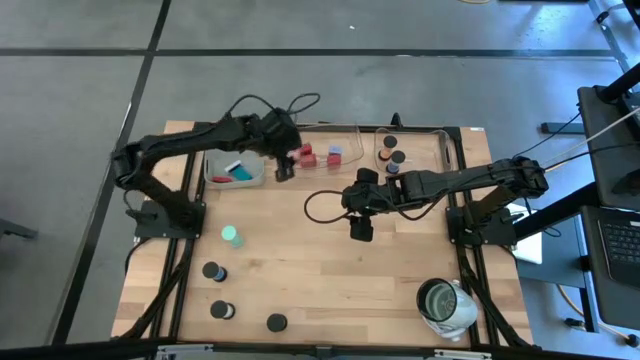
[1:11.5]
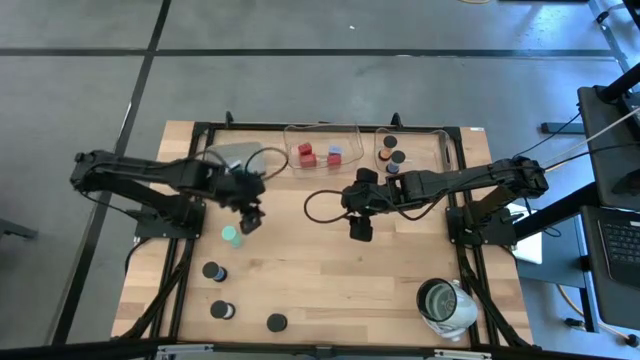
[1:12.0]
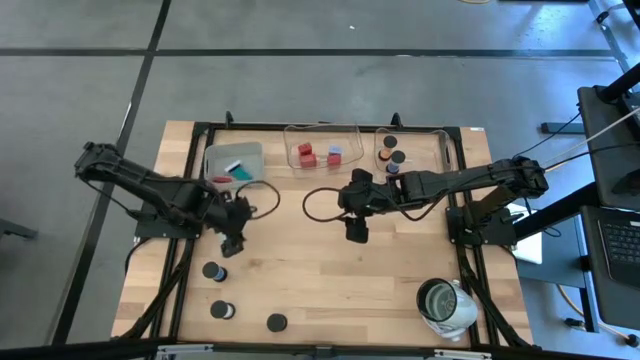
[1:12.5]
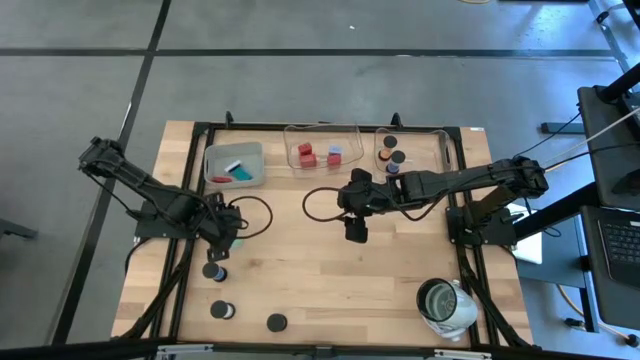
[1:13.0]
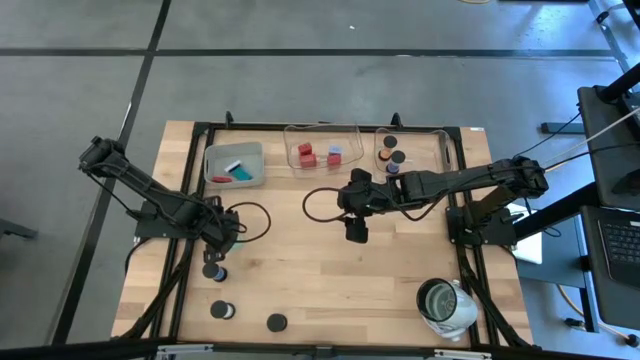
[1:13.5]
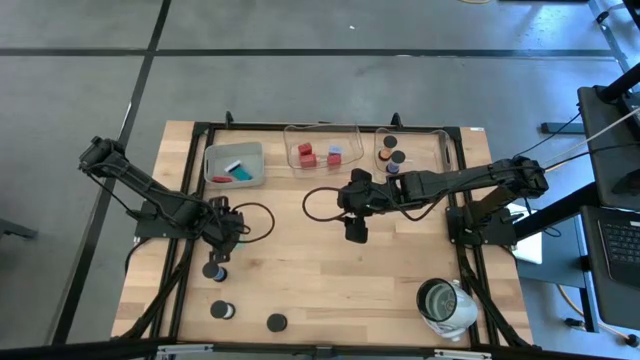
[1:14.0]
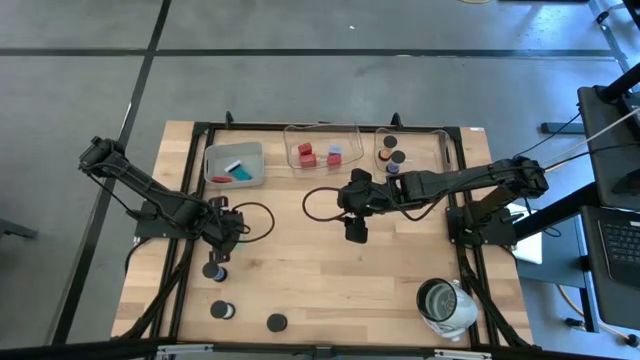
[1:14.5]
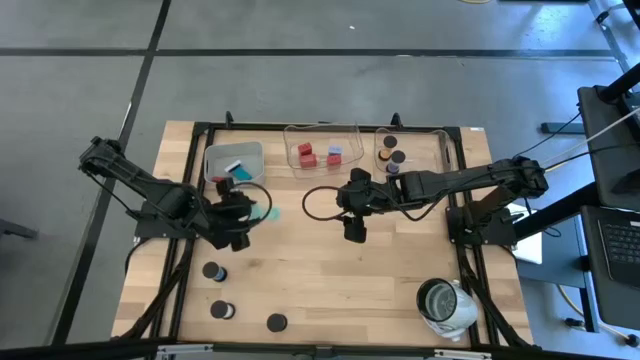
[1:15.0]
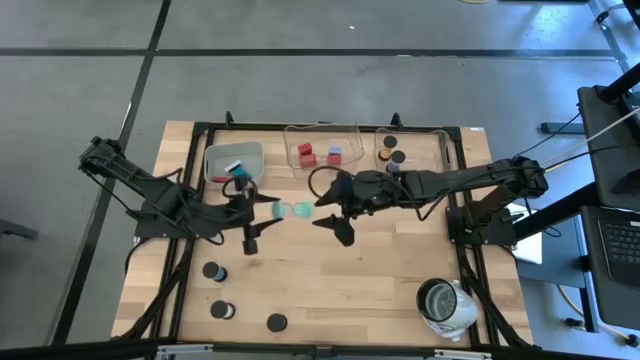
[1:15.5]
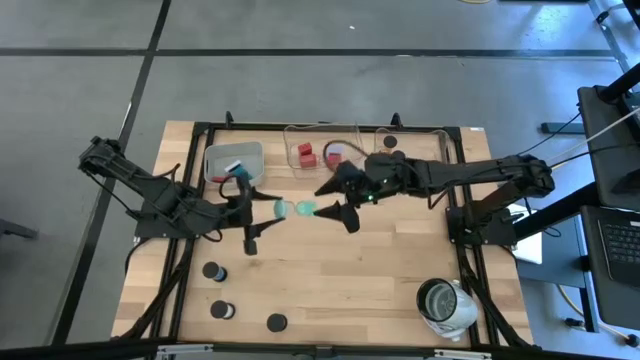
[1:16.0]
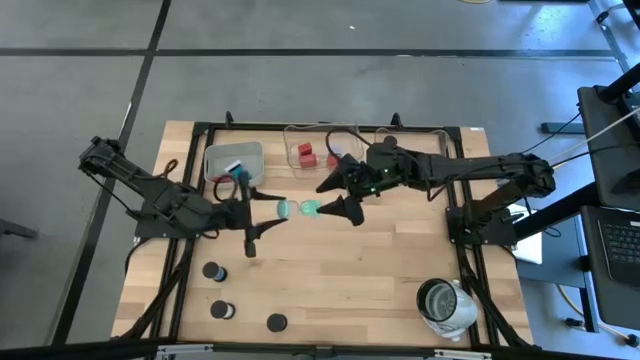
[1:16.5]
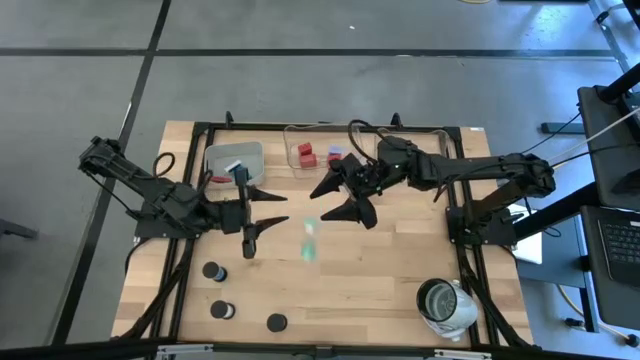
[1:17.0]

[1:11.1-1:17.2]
Task: Pick & Place Office items
Put the light blue hourglass into the right transparent bin

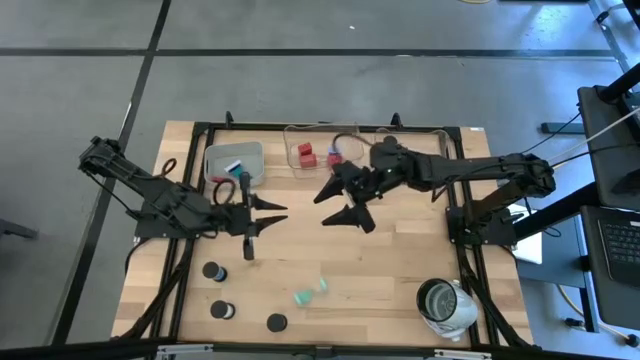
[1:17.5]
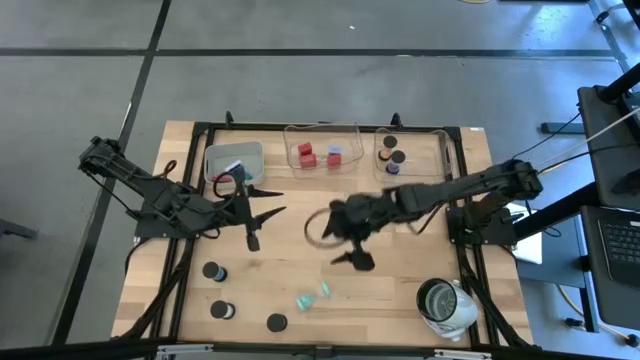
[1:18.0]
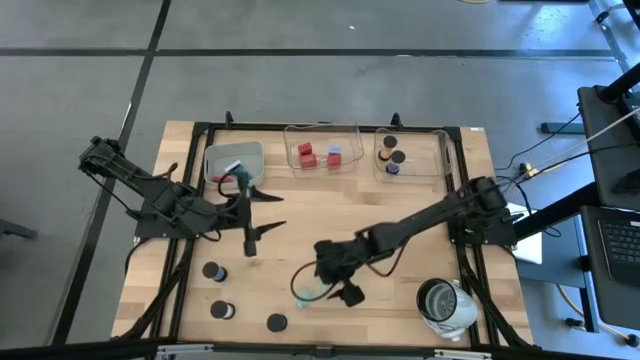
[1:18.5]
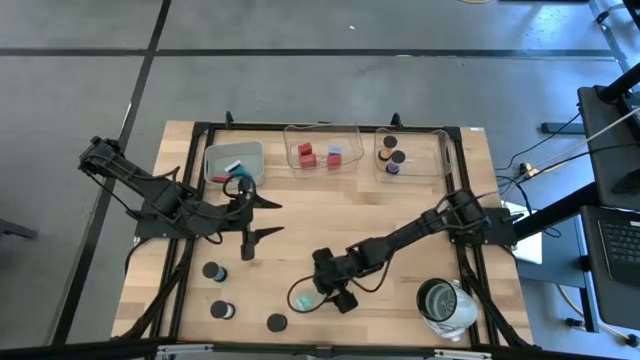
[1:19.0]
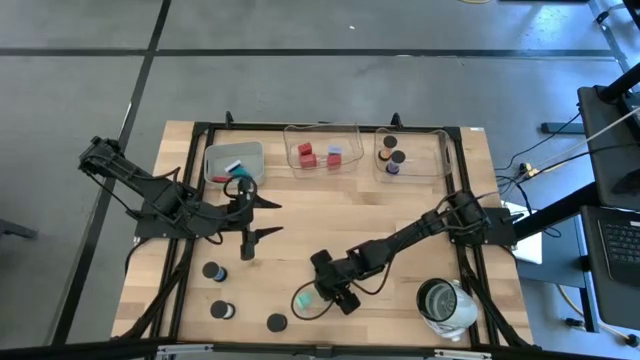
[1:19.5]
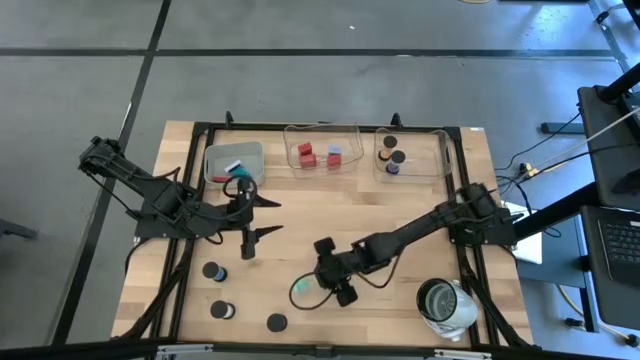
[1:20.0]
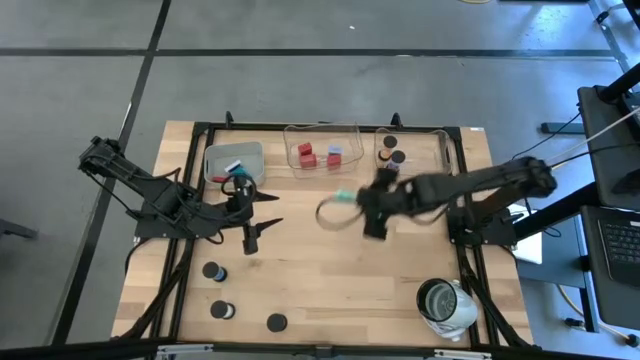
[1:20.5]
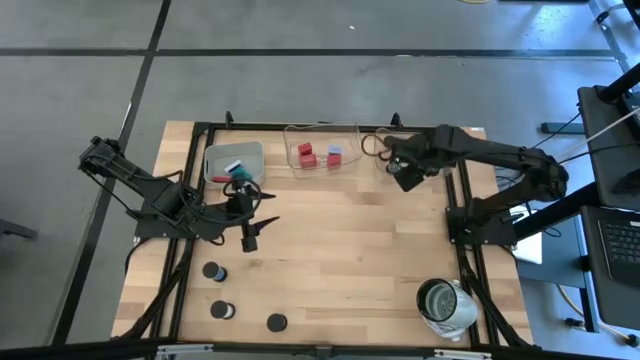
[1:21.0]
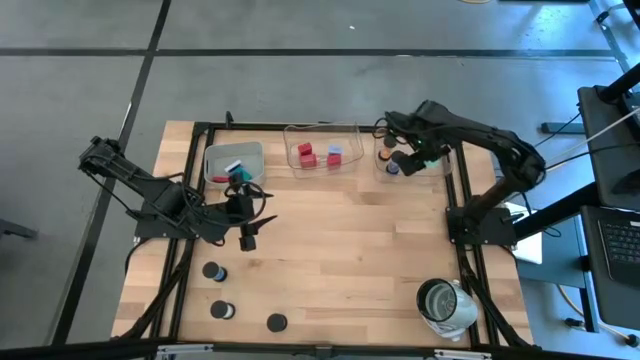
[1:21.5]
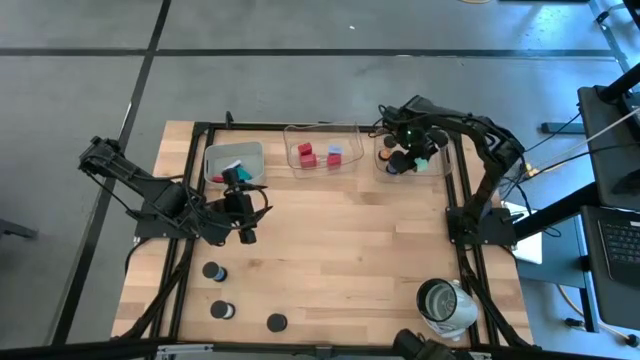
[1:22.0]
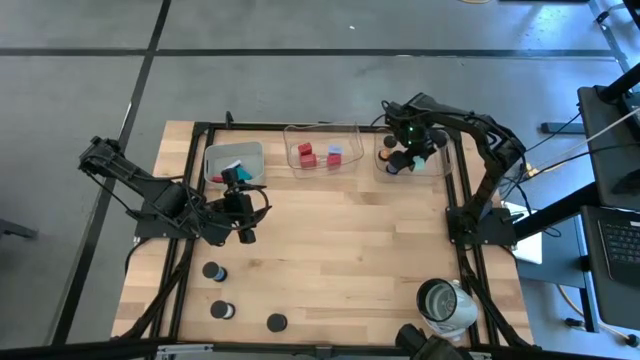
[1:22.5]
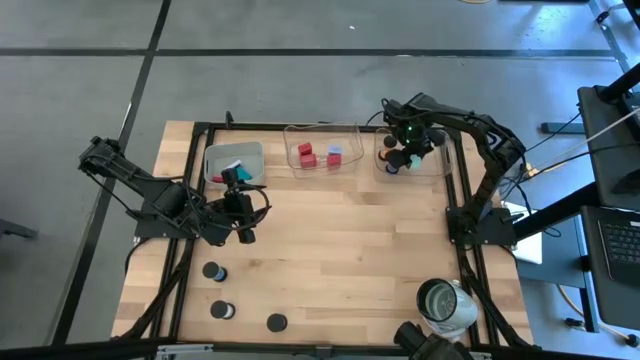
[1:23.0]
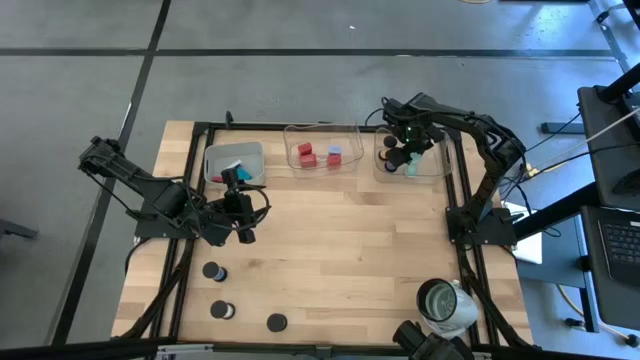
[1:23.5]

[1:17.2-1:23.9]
Put the light blue hourglass into the right transparent bin

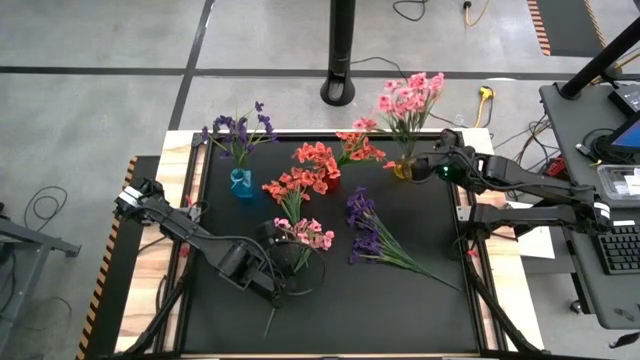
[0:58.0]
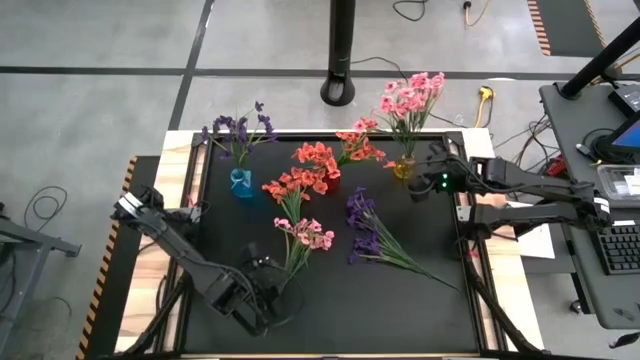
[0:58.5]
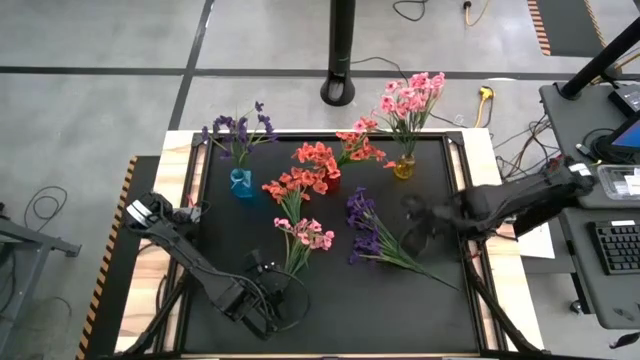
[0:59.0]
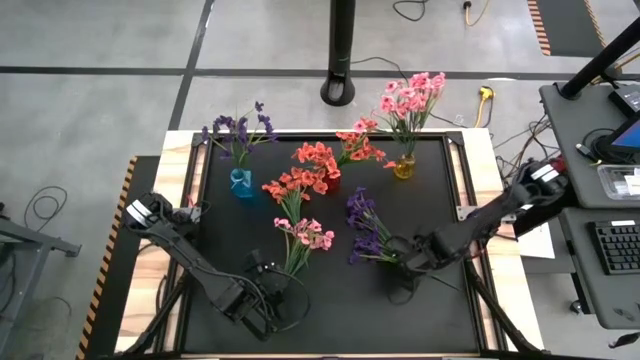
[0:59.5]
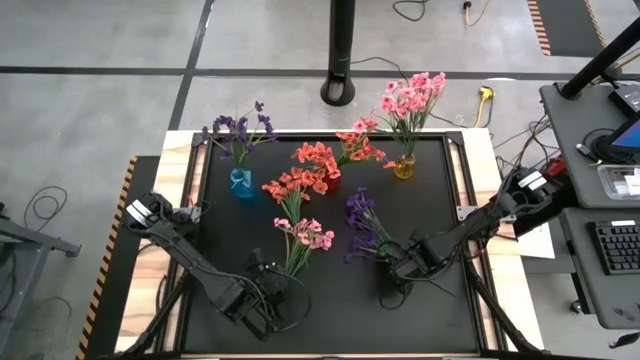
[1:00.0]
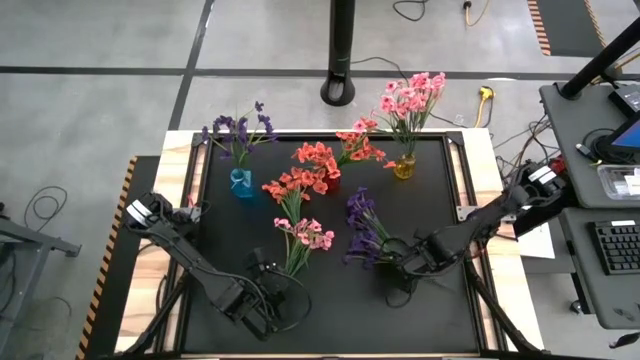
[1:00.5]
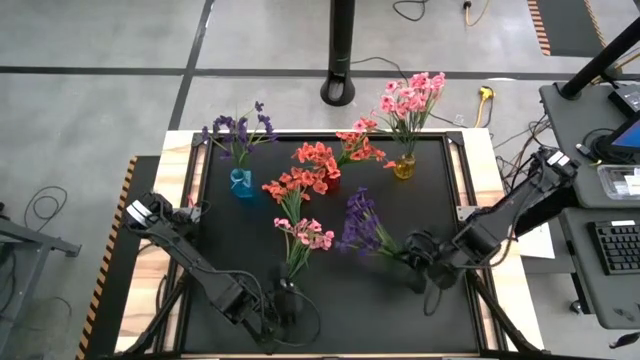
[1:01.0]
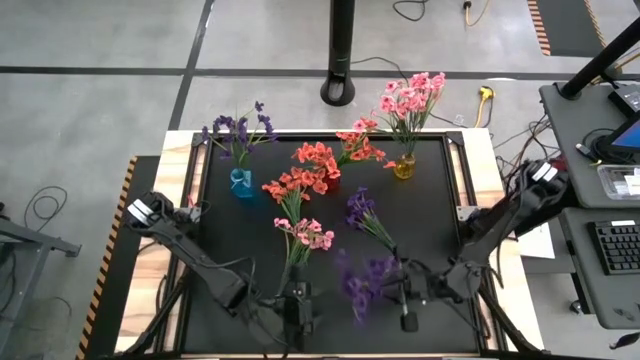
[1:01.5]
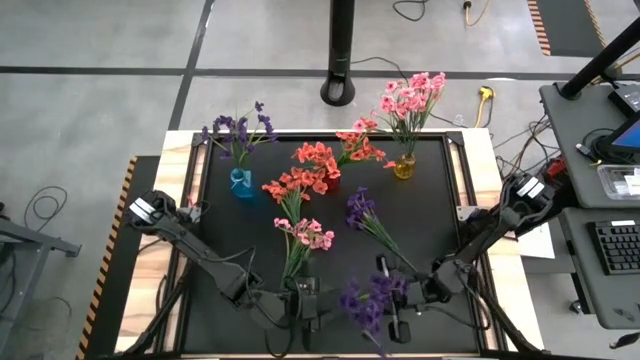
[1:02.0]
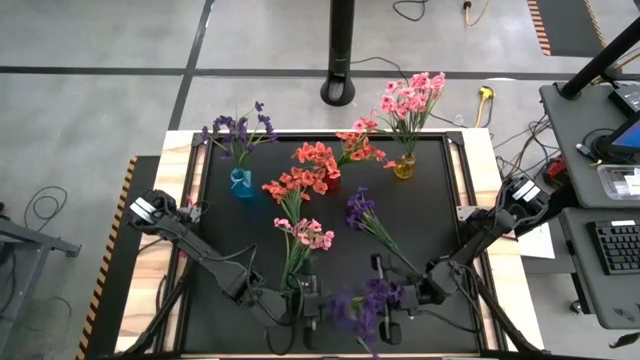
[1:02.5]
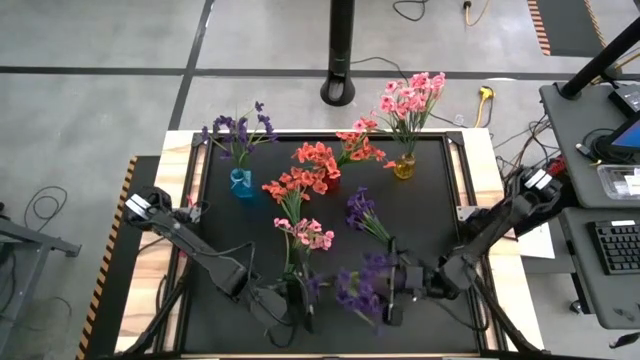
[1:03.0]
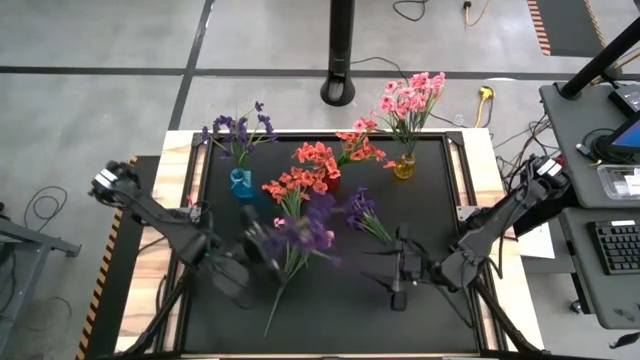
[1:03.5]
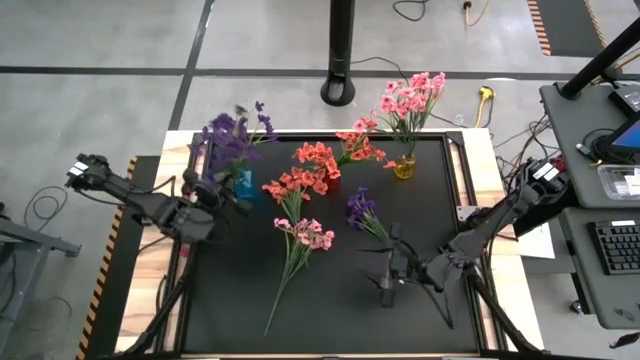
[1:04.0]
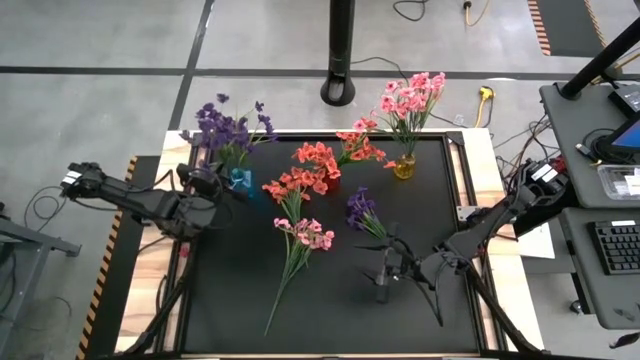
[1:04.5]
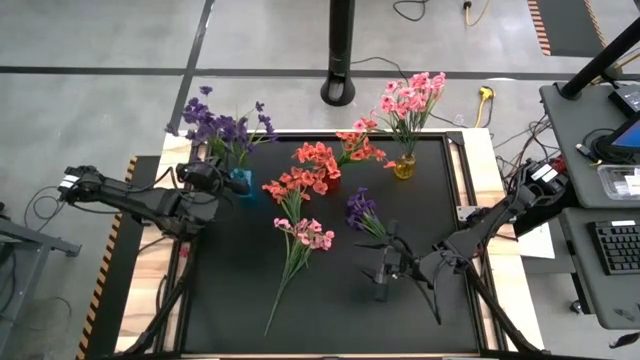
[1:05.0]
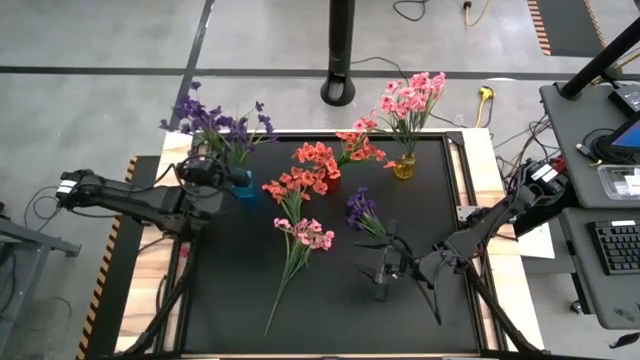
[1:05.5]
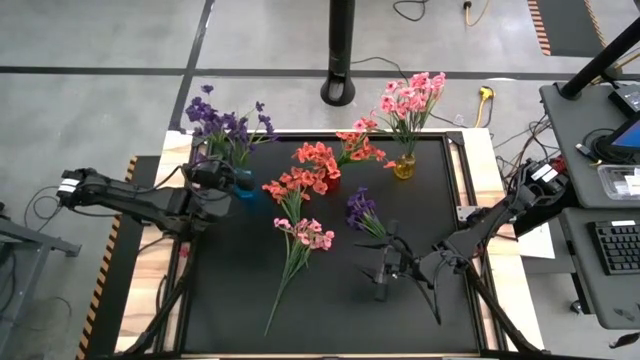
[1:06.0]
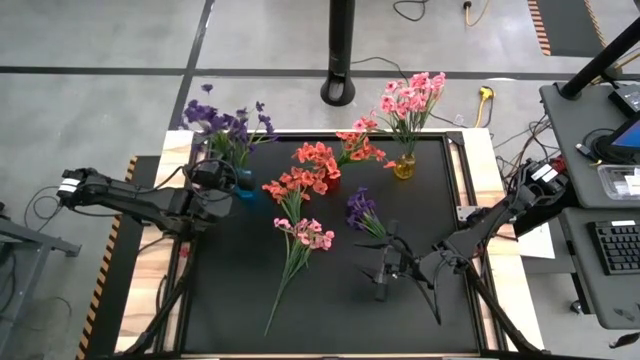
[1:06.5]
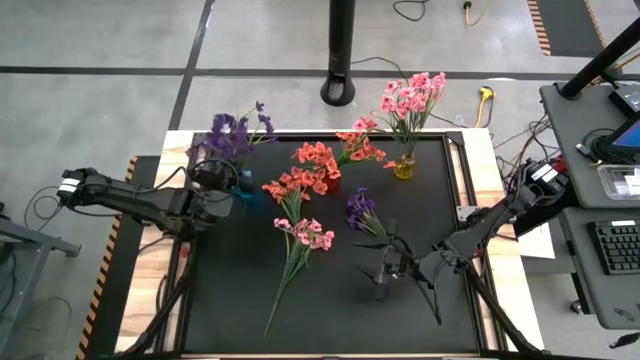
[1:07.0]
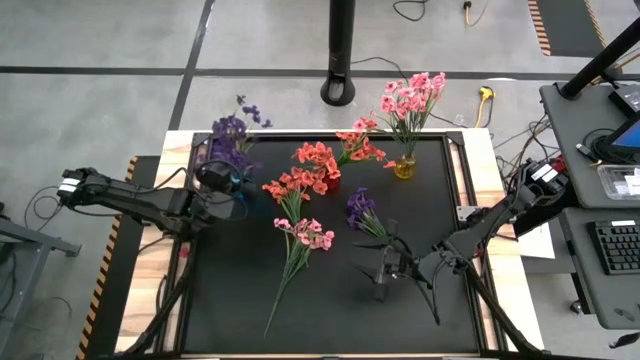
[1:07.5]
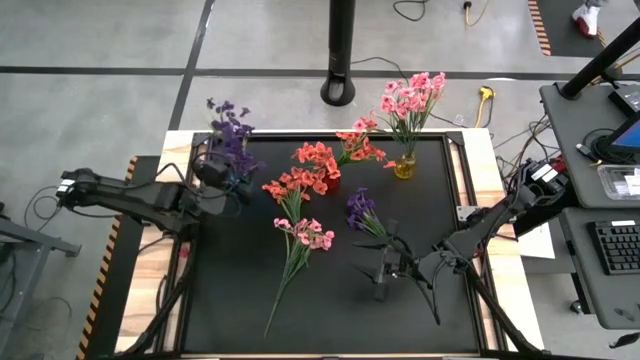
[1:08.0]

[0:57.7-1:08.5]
Task: Sort flowers into vase by color
Put the bottom violet flowers into the blue vase
